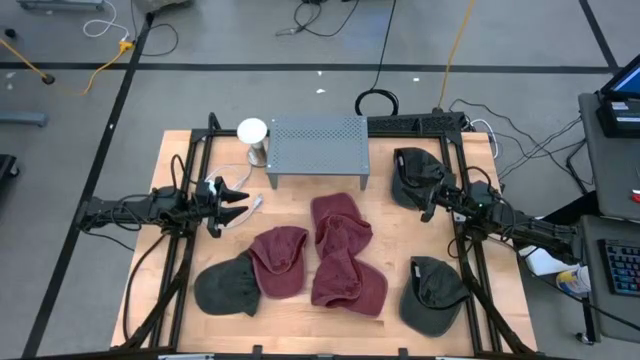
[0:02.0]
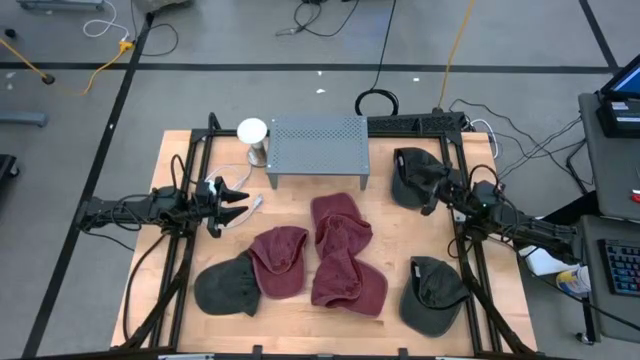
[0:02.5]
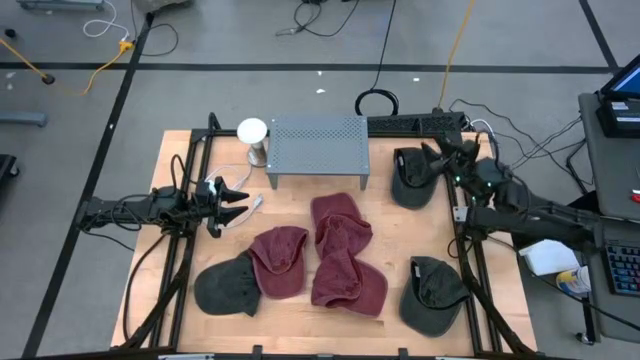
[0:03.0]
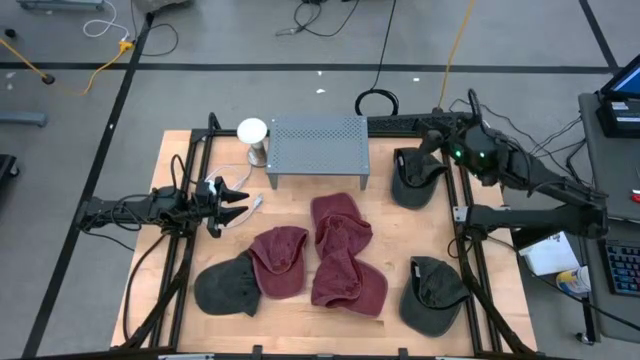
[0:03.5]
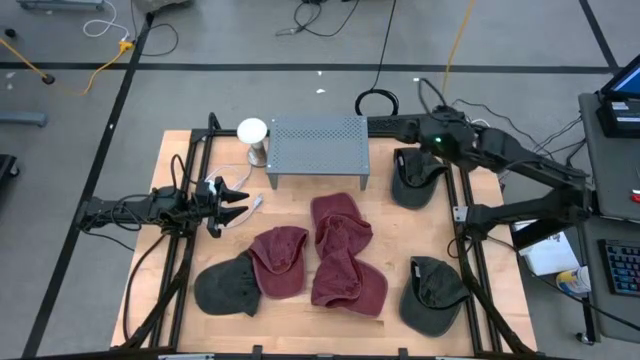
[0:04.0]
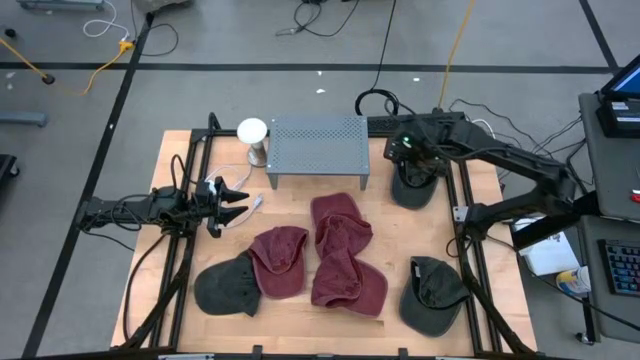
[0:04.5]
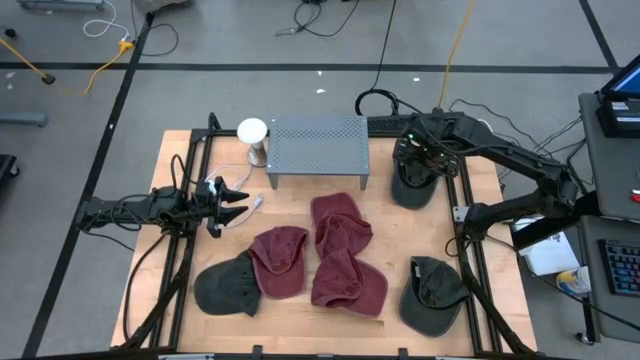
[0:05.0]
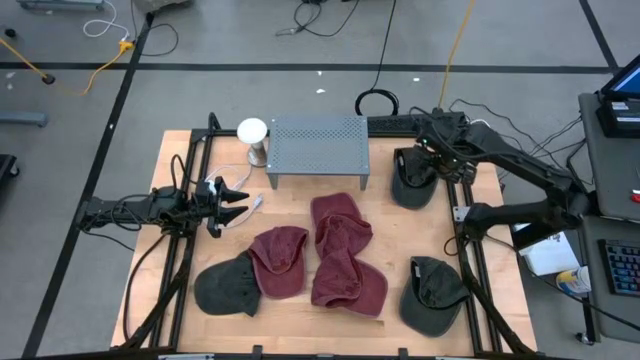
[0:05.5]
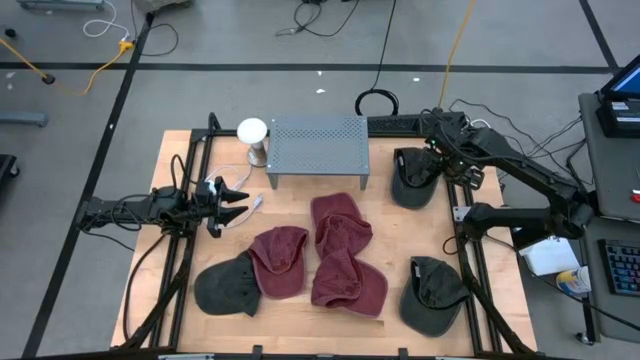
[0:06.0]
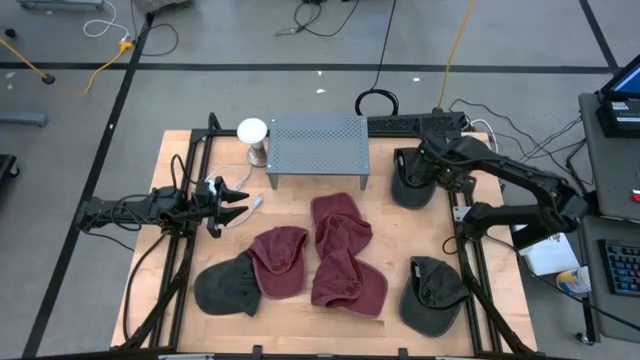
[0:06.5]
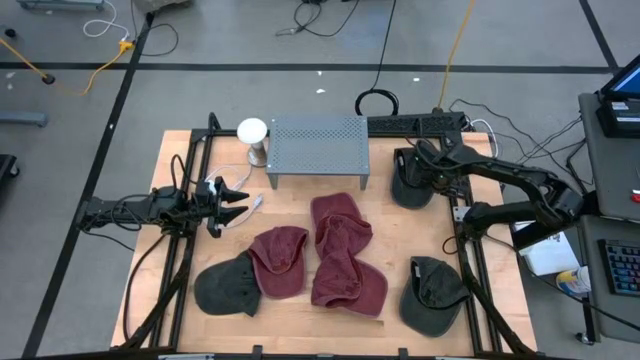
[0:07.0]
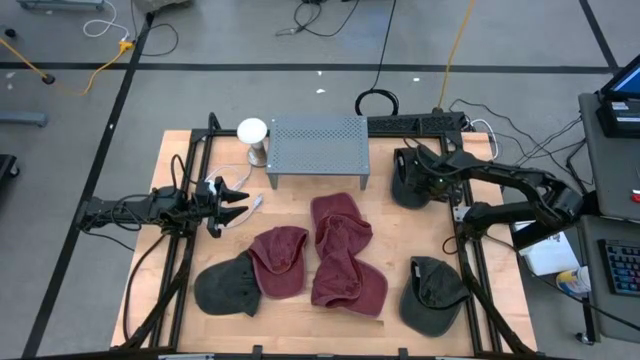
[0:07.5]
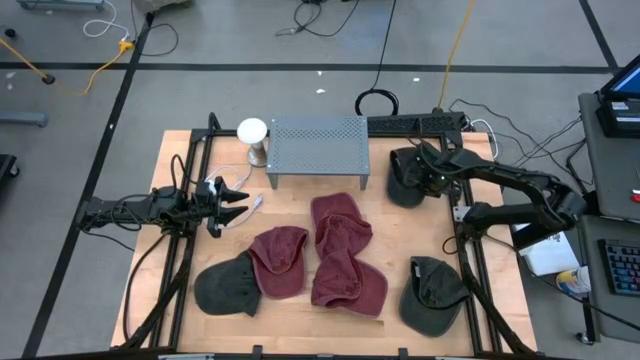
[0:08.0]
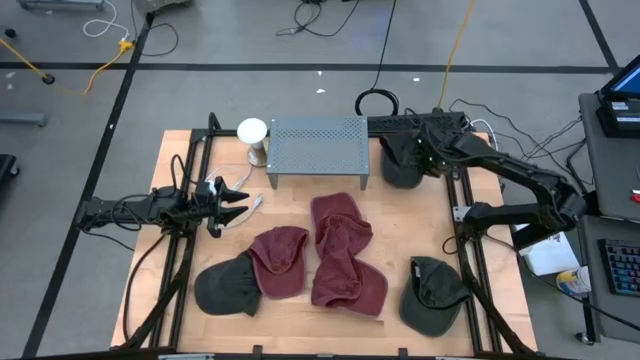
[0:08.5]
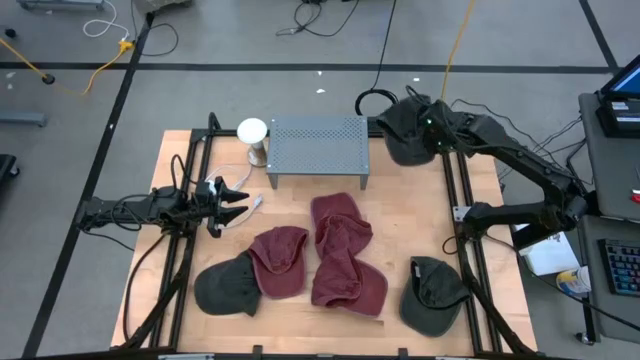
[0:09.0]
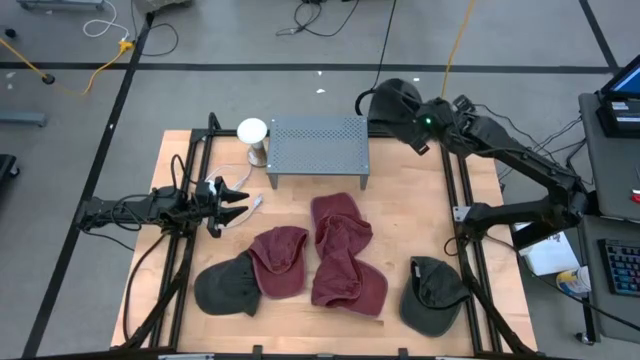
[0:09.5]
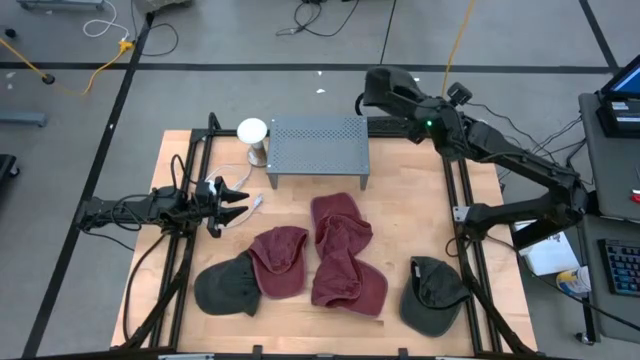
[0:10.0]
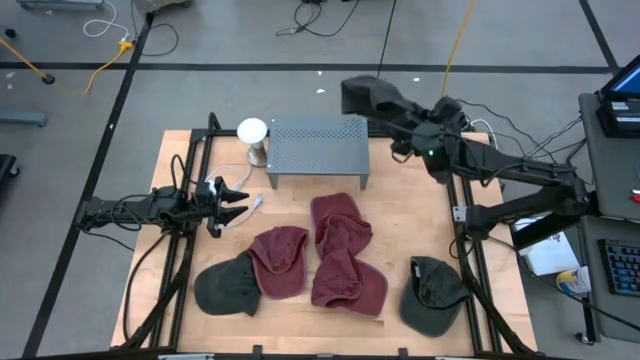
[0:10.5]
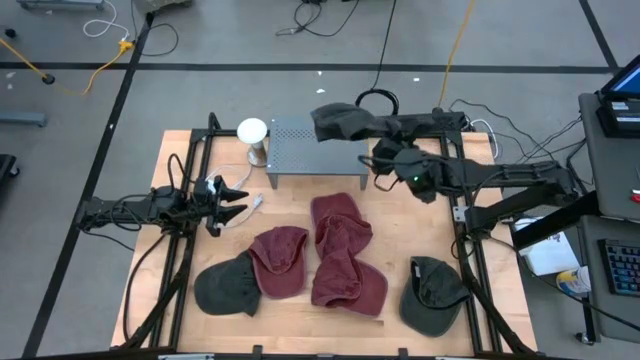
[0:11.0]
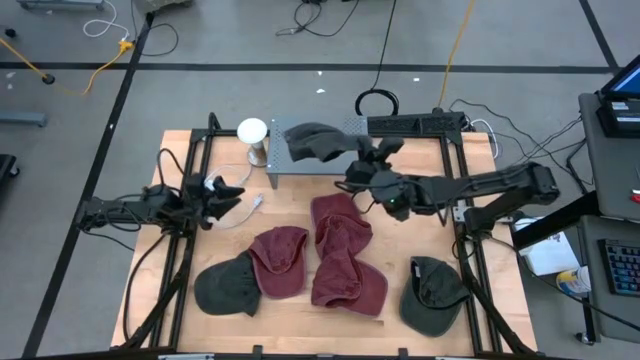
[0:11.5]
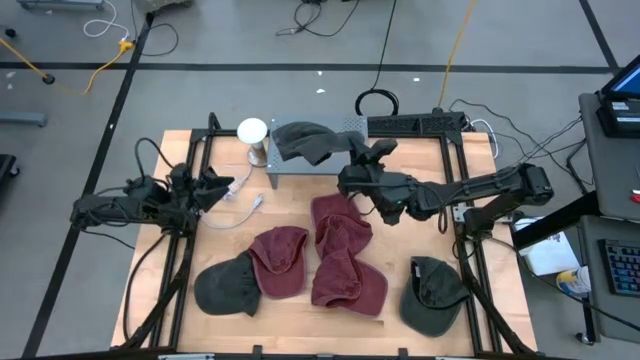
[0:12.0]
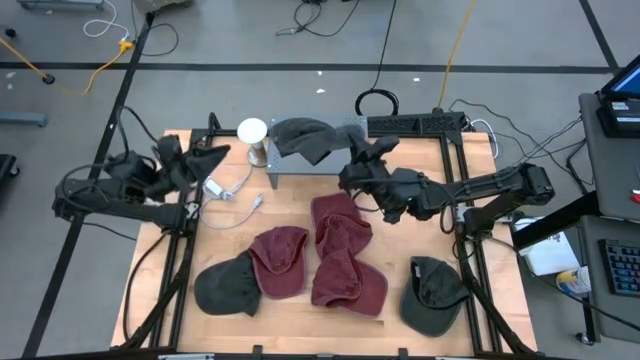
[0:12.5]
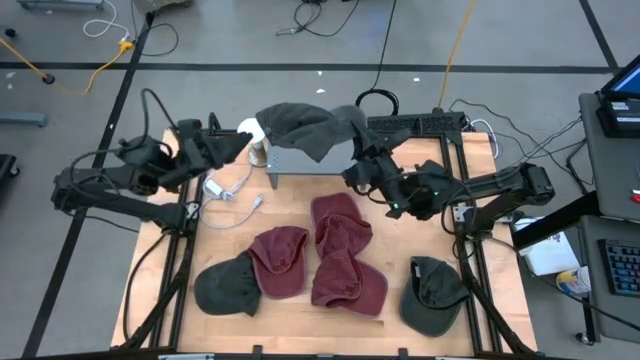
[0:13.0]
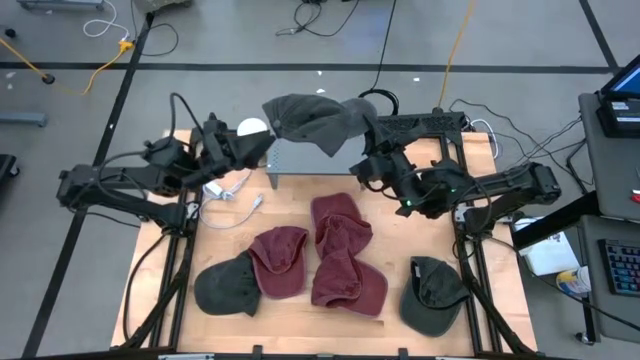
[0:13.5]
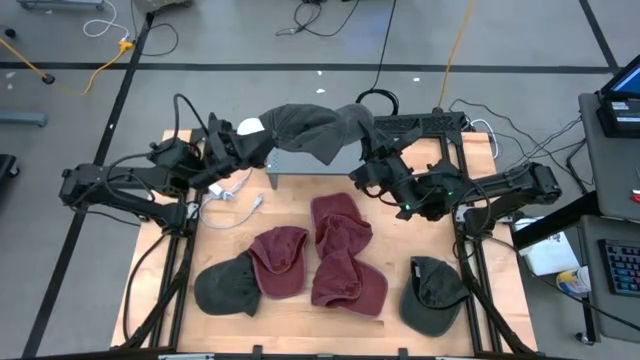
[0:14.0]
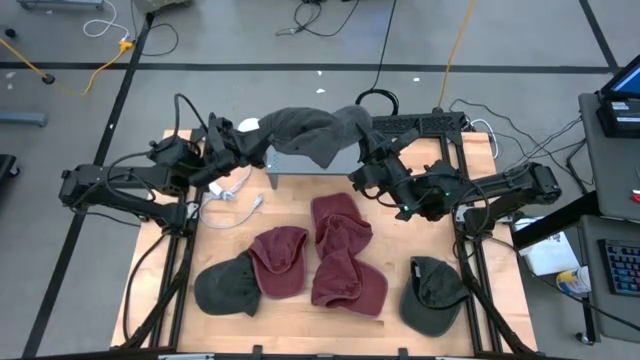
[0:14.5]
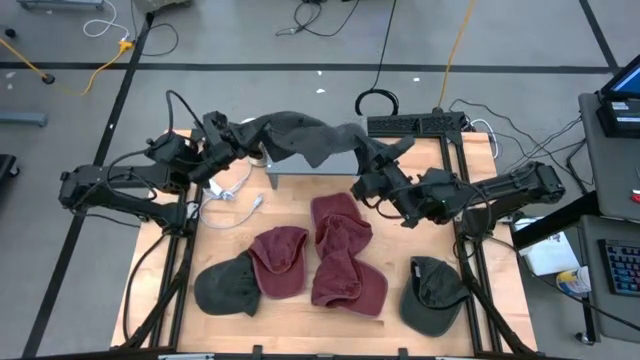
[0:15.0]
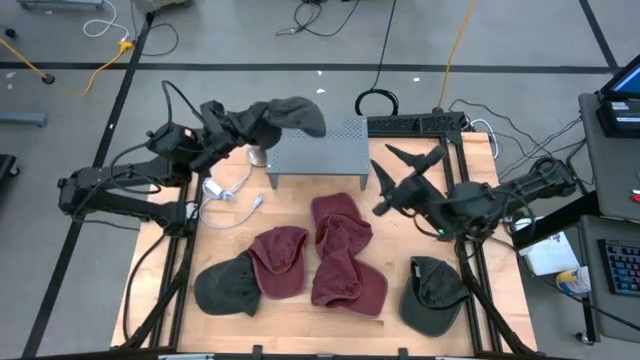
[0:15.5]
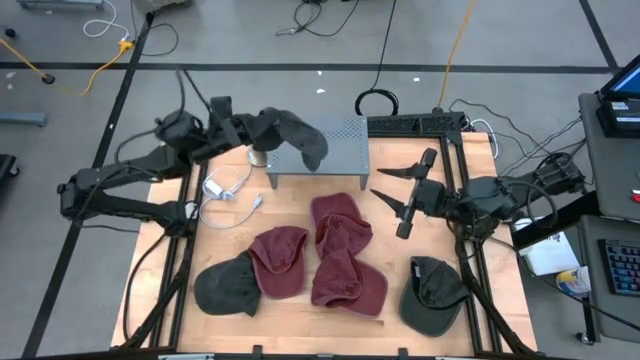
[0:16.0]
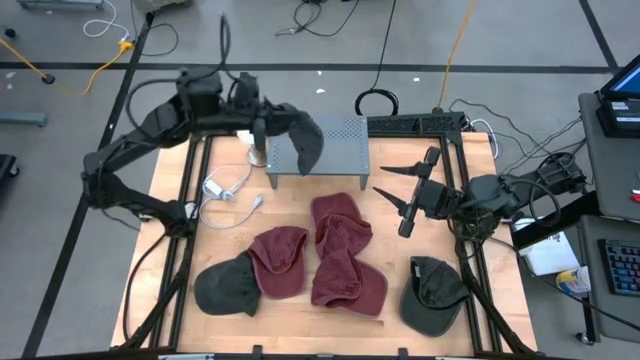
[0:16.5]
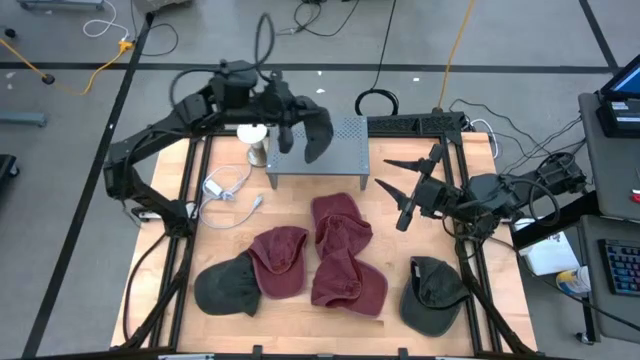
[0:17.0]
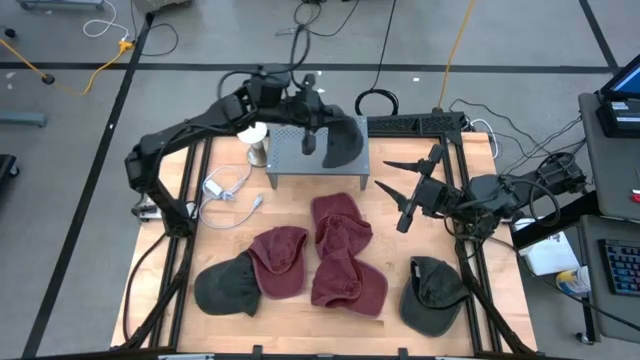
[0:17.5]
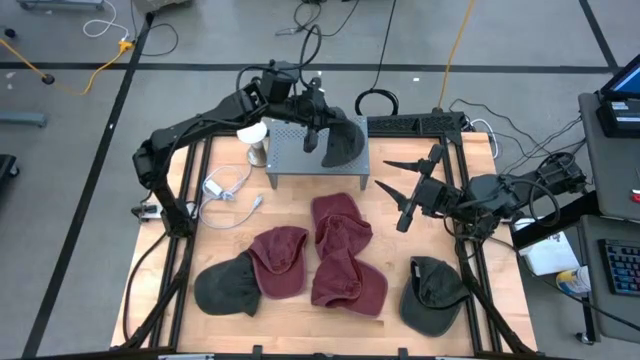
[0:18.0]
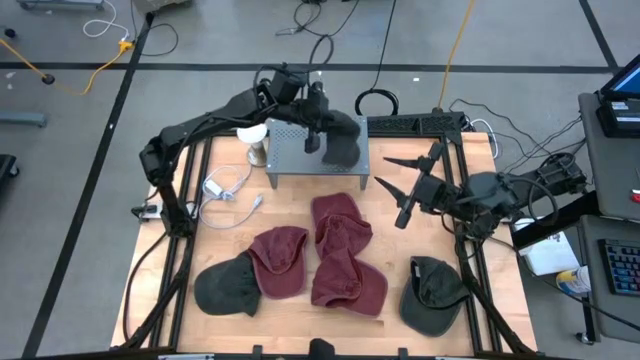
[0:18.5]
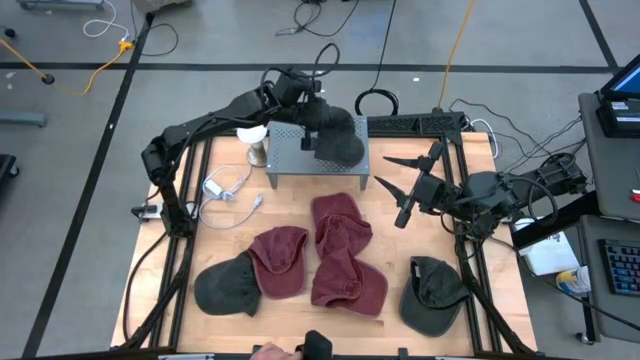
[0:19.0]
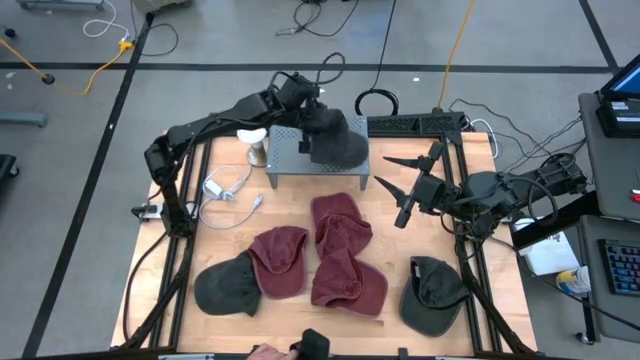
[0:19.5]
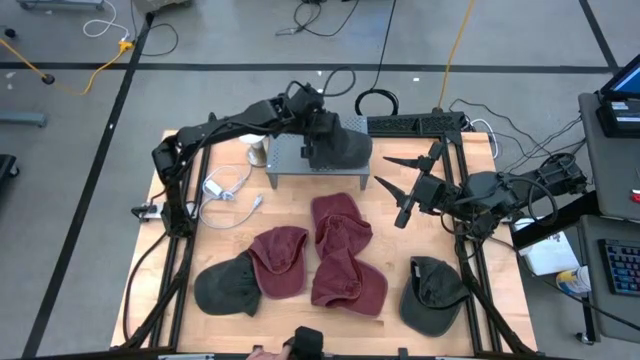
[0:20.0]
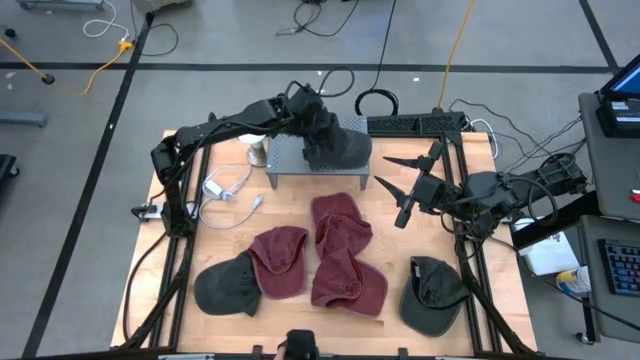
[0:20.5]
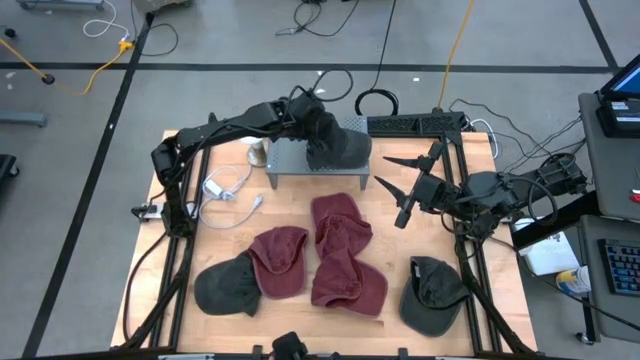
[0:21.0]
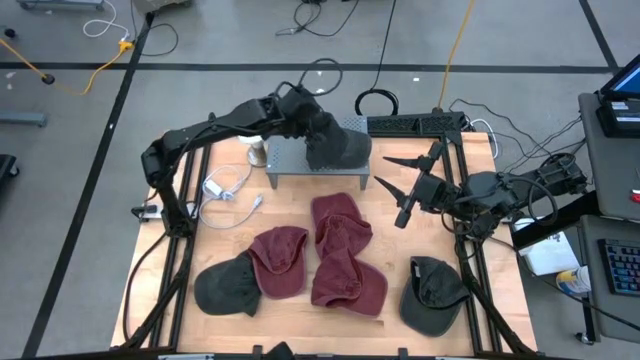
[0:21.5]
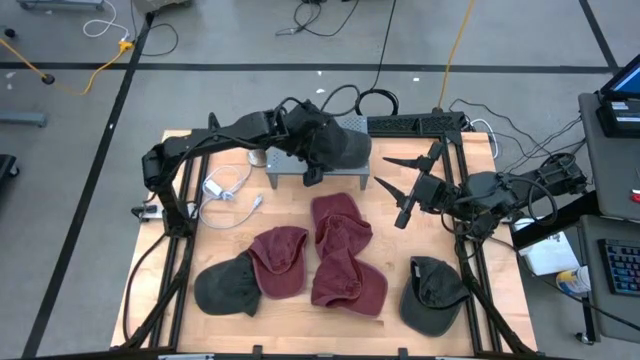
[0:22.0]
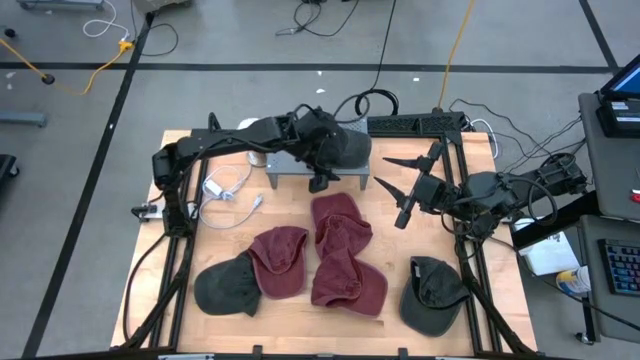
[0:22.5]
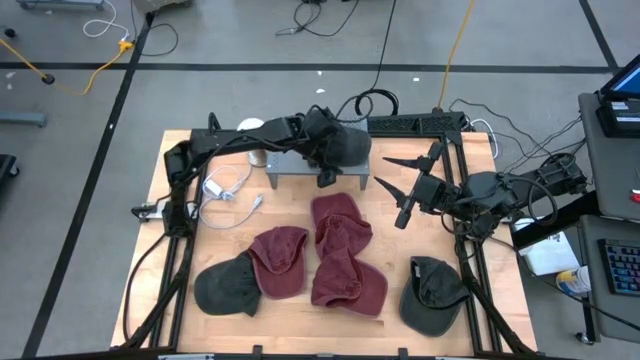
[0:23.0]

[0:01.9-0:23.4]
Task: Pick & Place hat
Put the top black cap on the shelf
